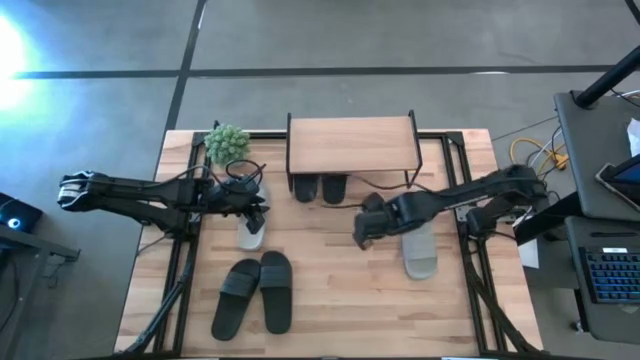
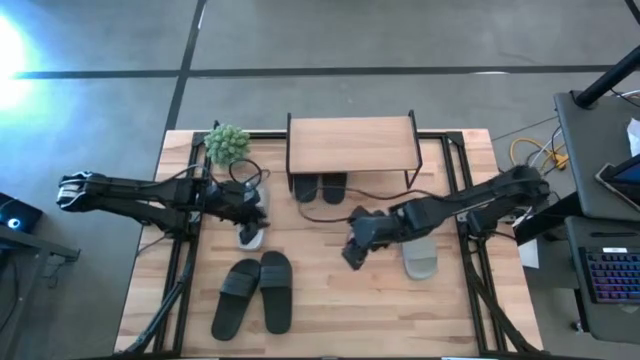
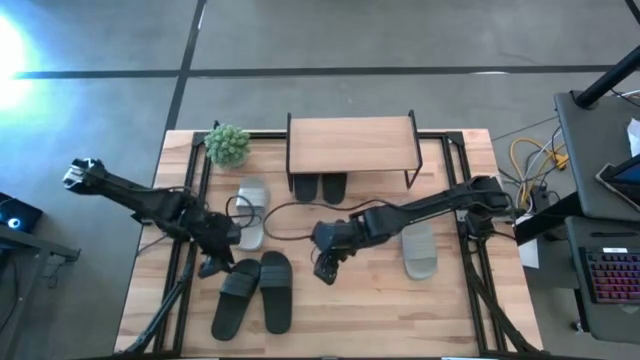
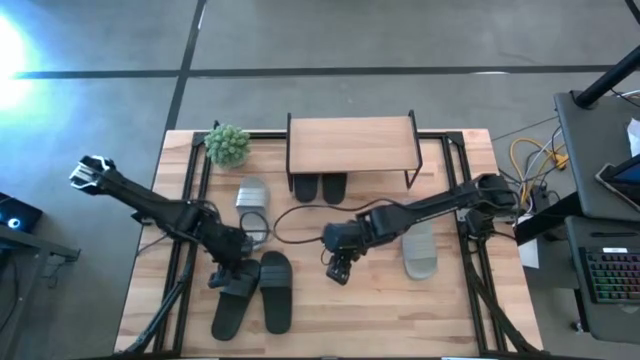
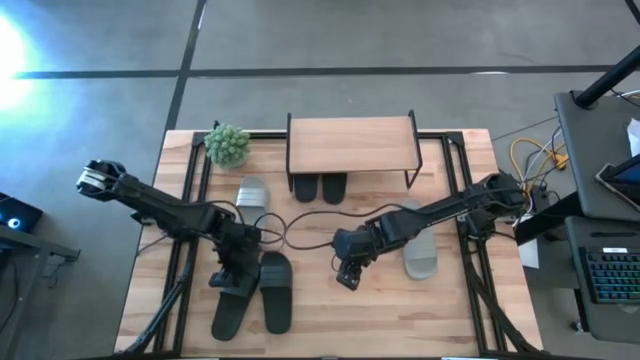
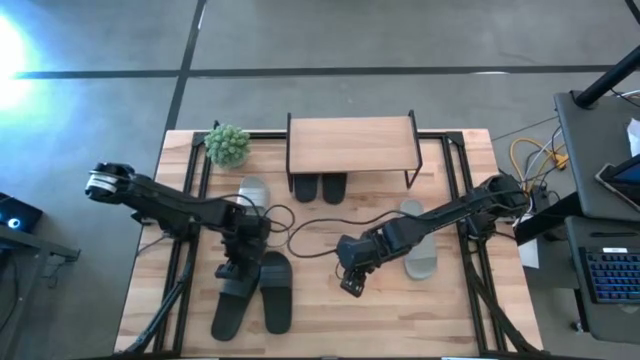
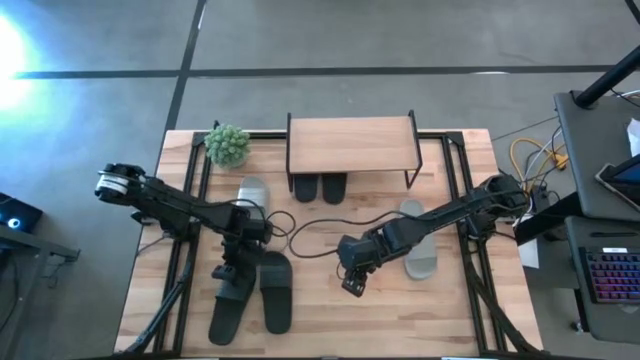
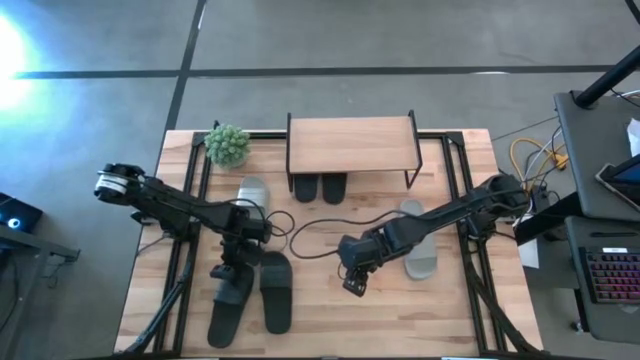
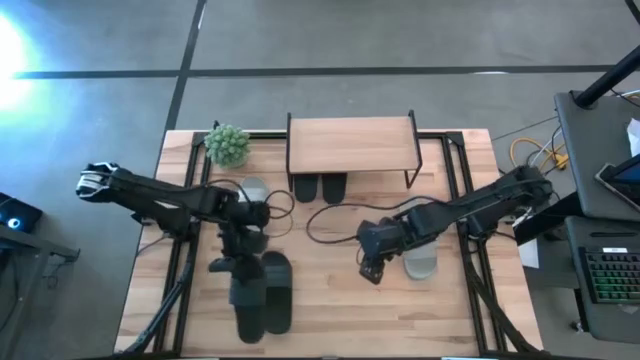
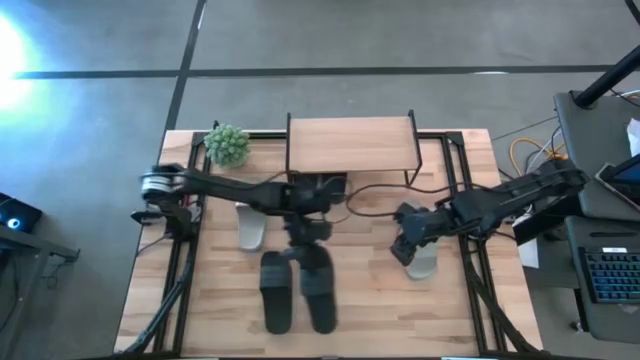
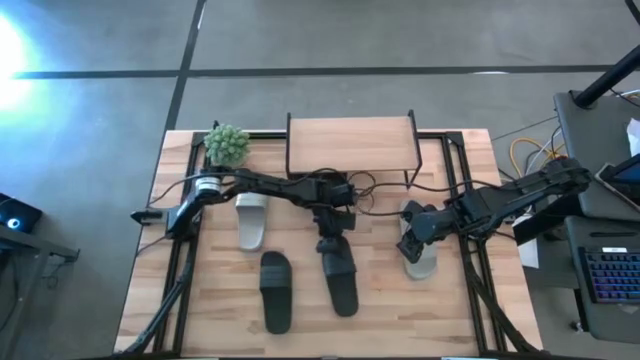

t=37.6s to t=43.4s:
Task: Pick and place slides into the shelf
Move the black slide to the center of the table

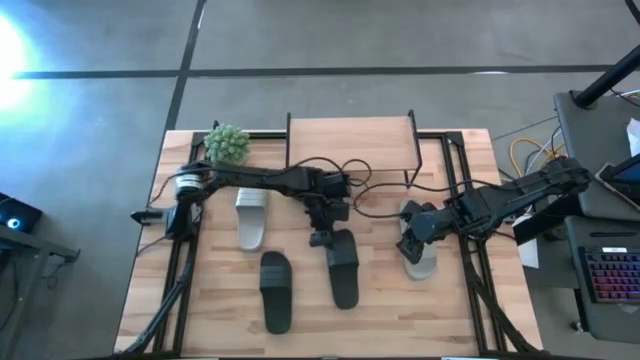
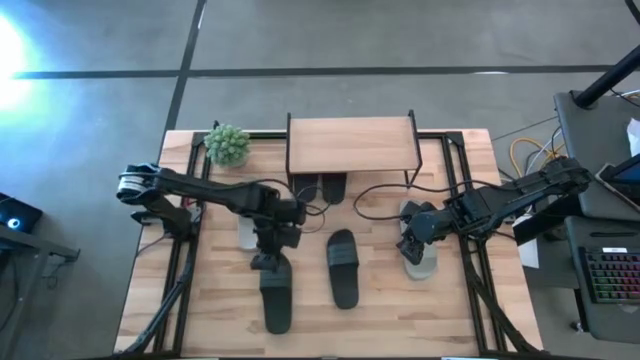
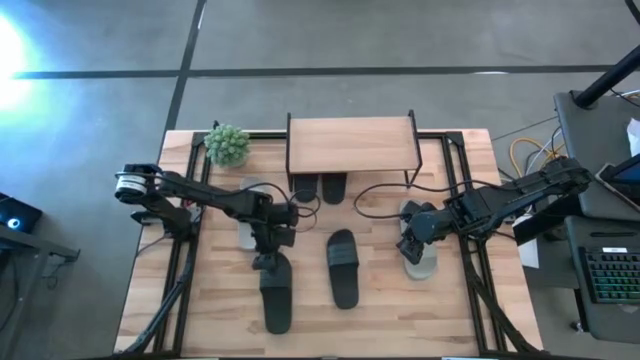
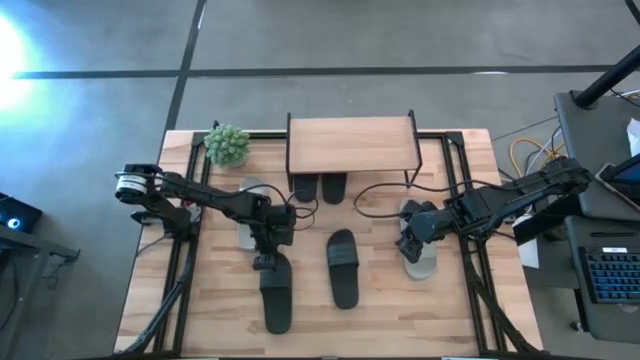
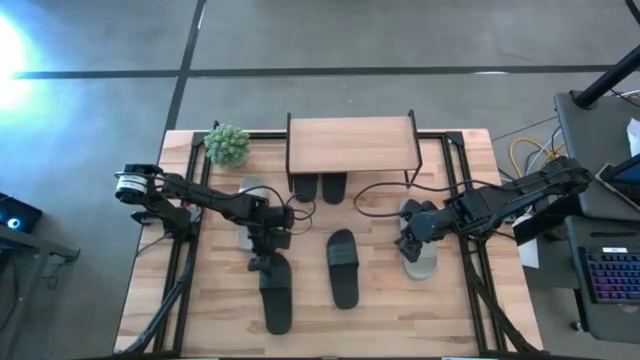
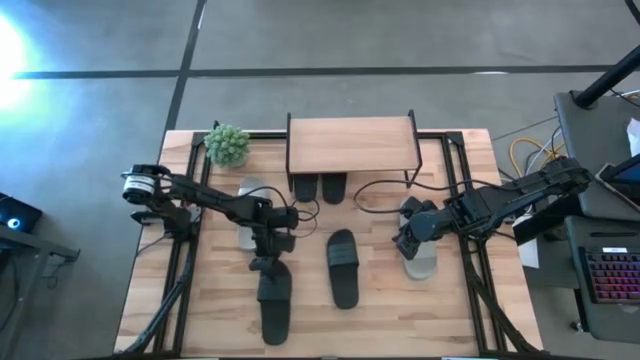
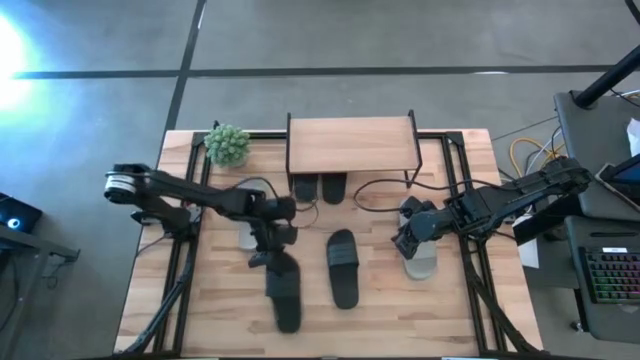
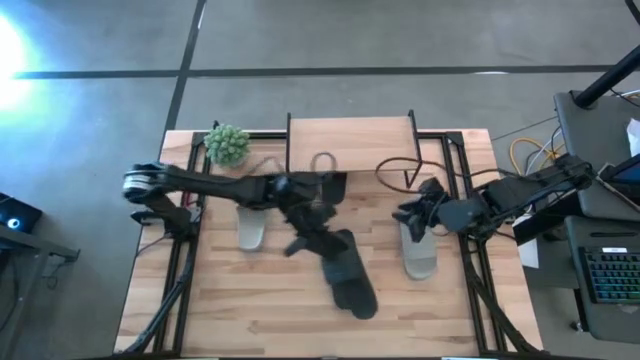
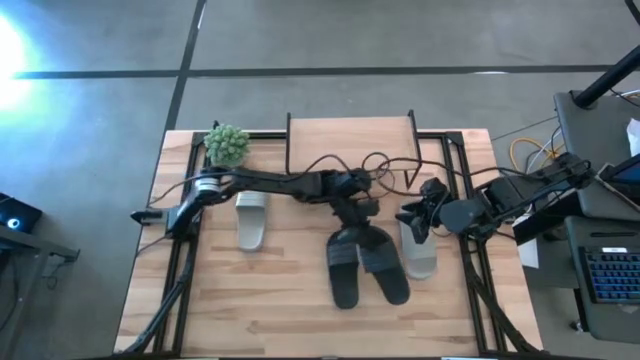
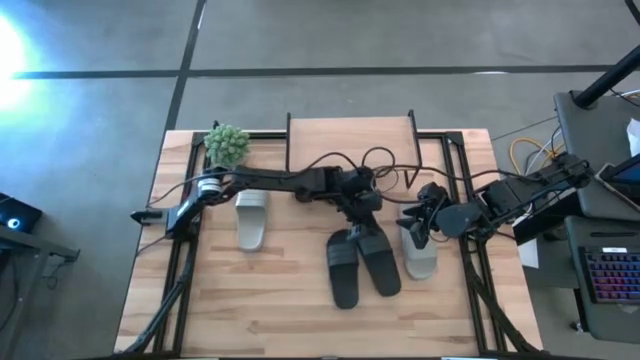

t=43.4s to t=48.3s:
Move the black slide to the center of the table

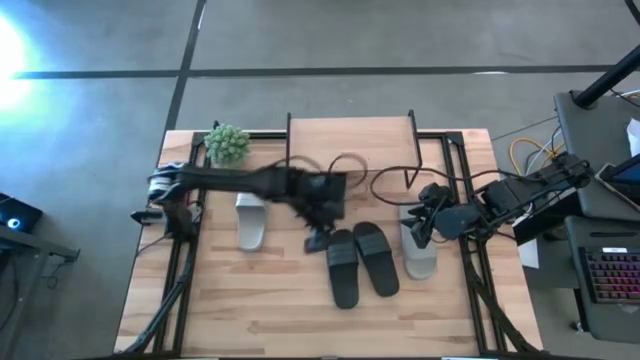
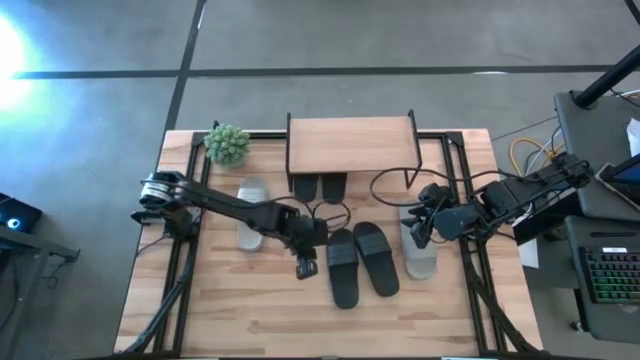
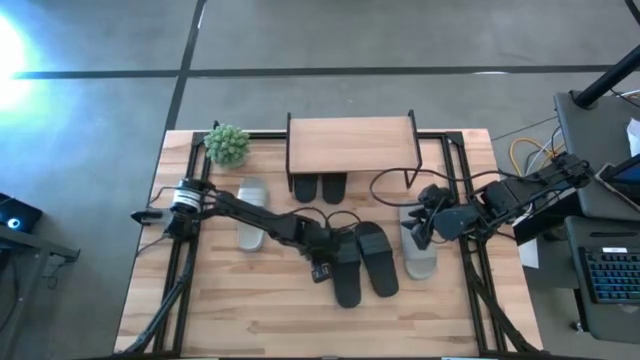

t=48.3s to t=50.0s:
Adjust the black slides on the table

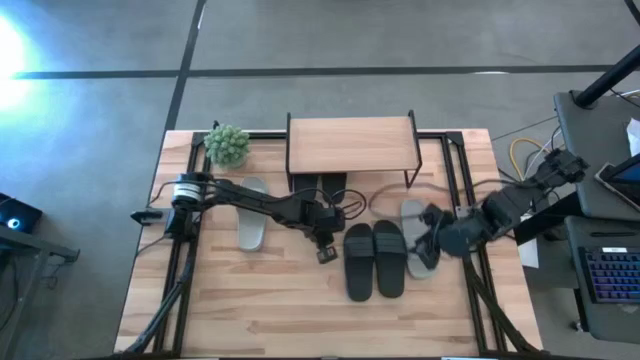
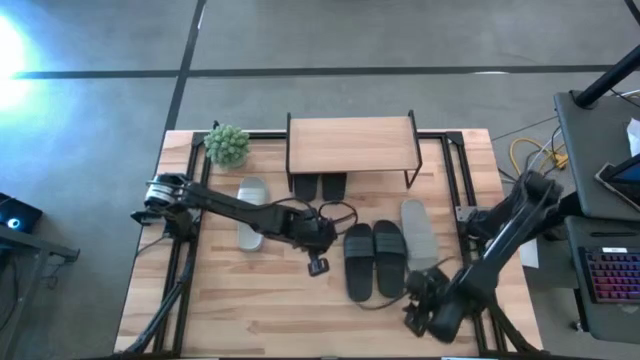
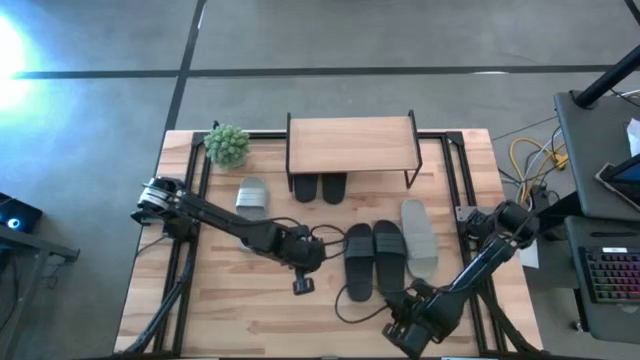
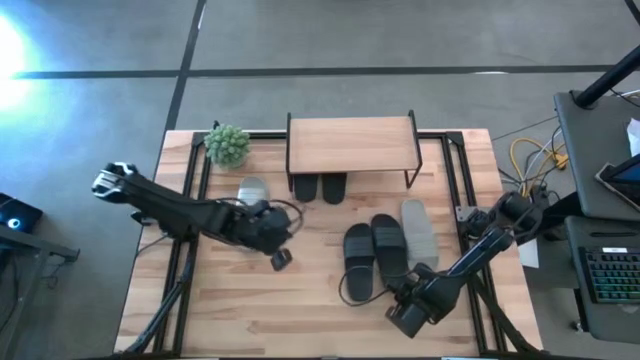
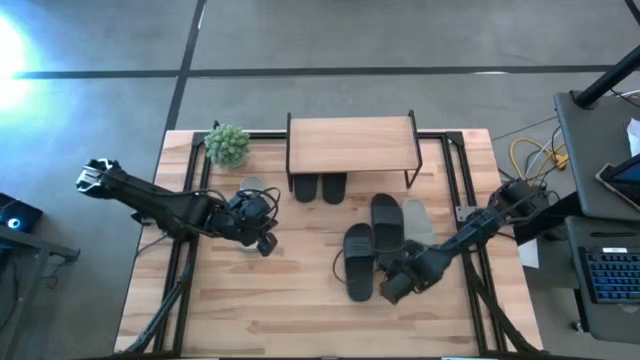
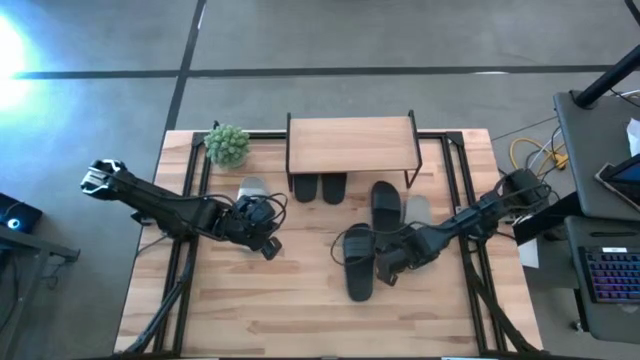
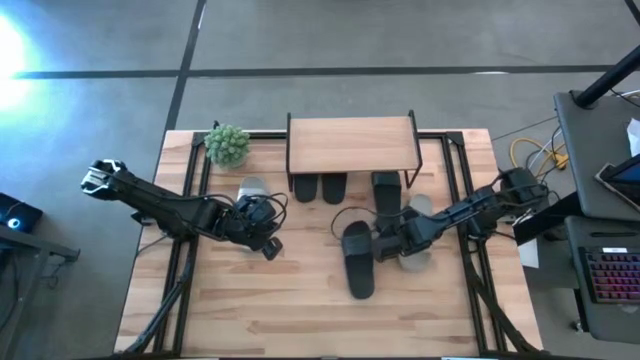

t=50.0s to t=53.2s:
Put the black slide under the shelf

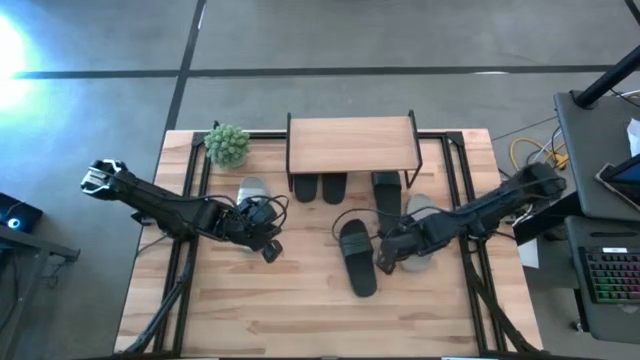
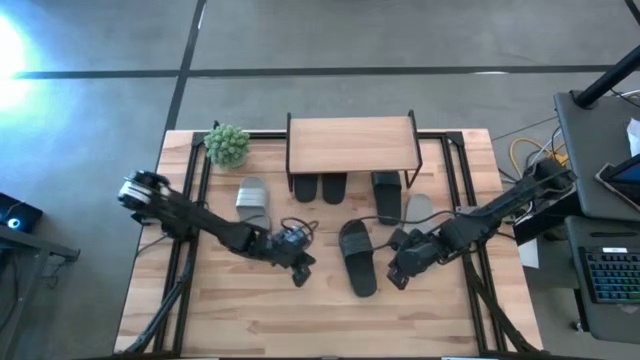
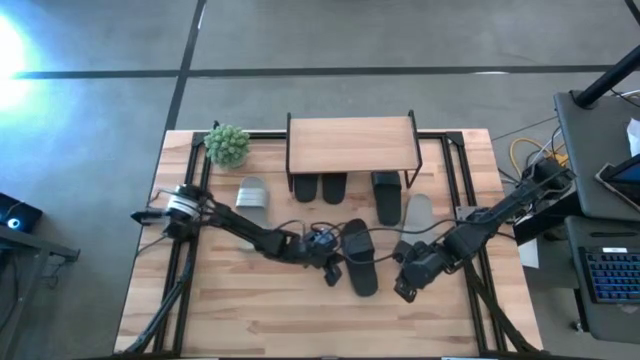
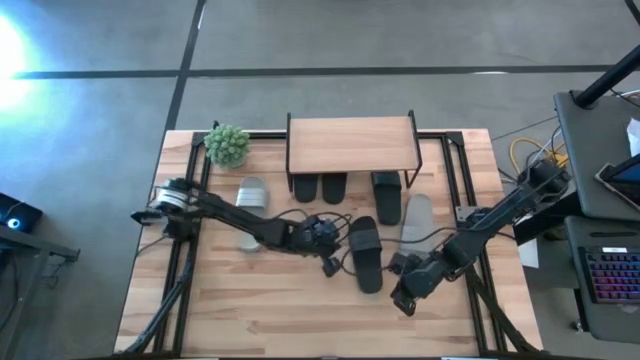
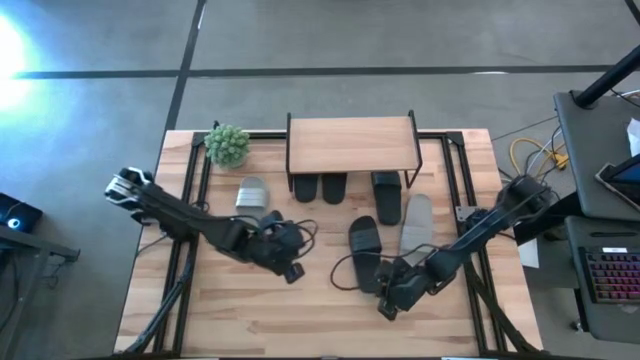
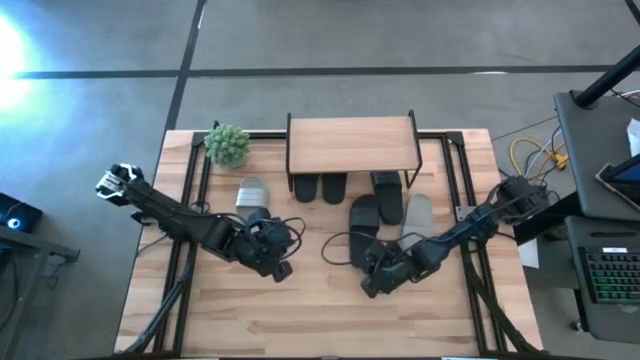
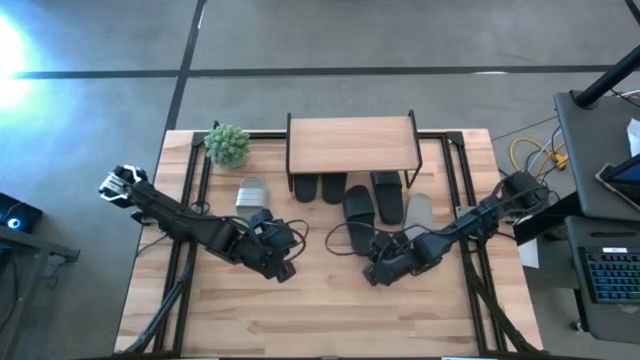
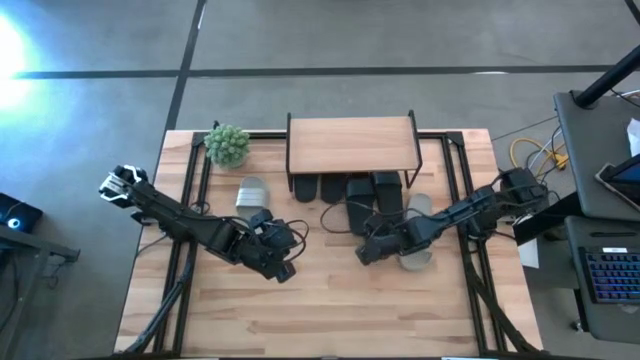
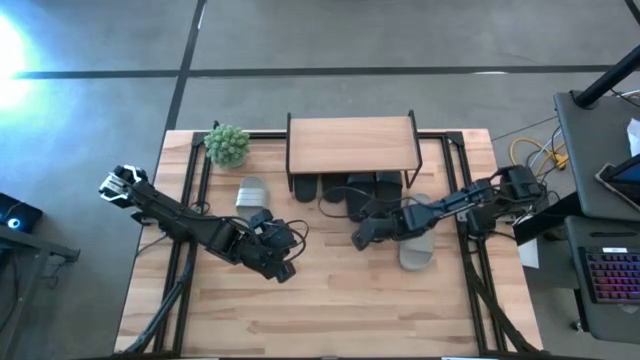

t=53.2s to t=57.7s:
Put the black slide under the shelf

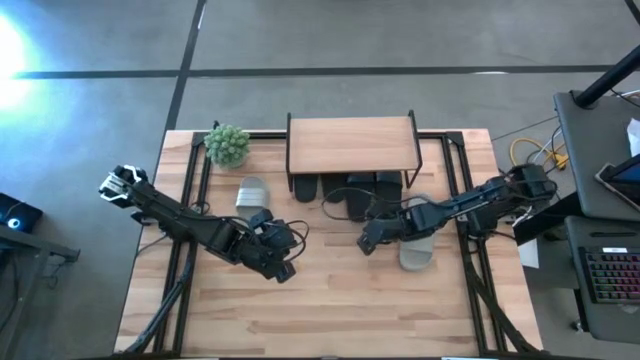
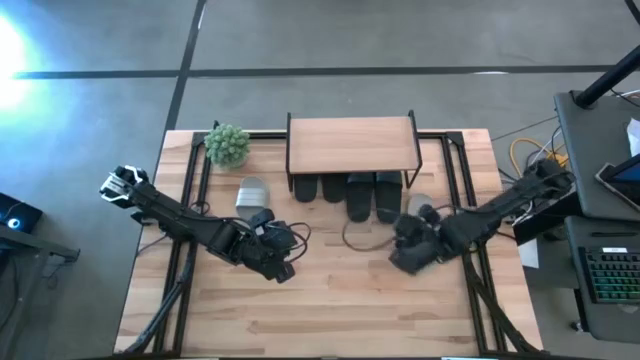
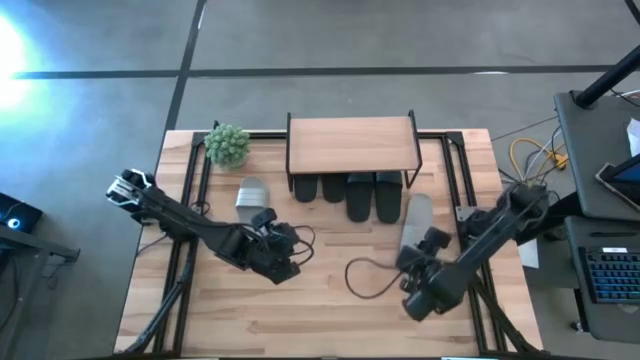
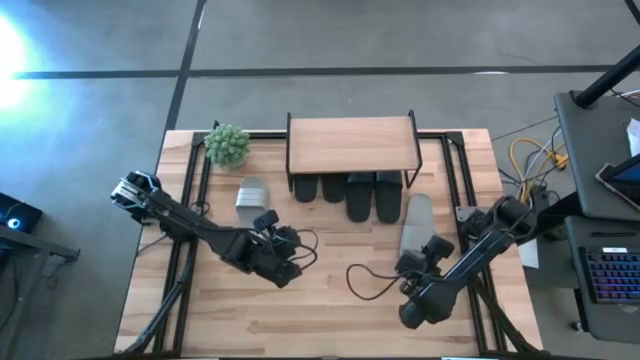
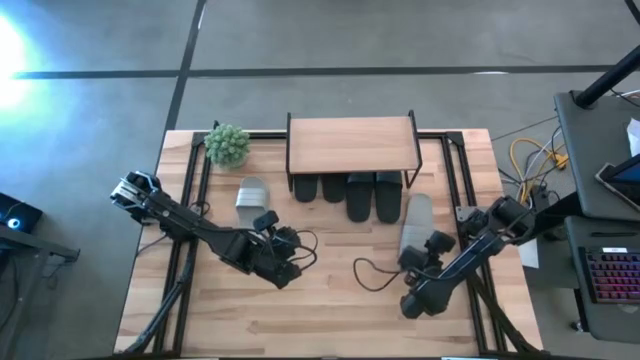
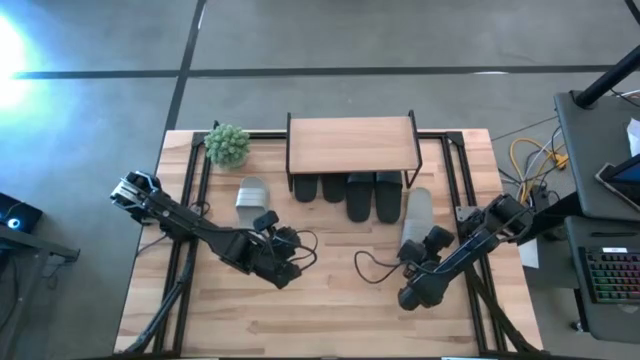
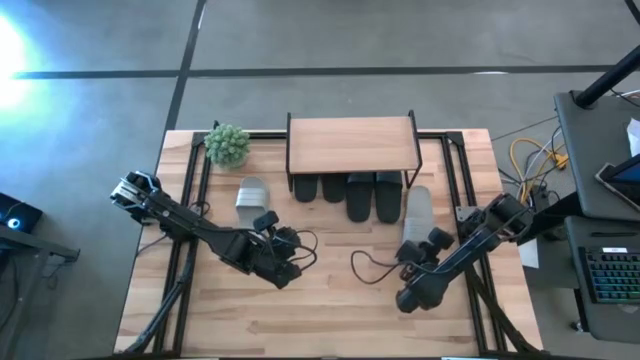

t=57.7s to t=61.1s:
Put the white slide on the shelf
